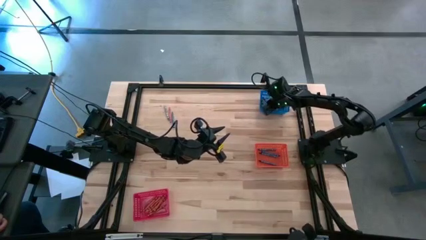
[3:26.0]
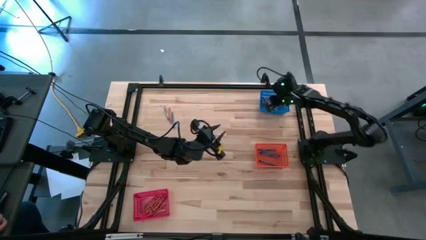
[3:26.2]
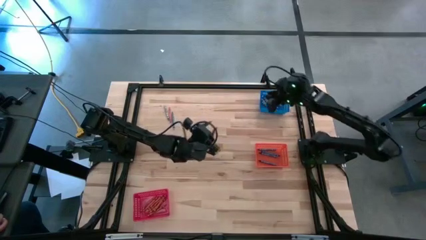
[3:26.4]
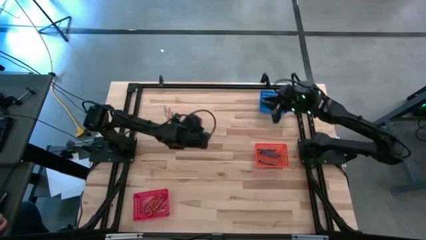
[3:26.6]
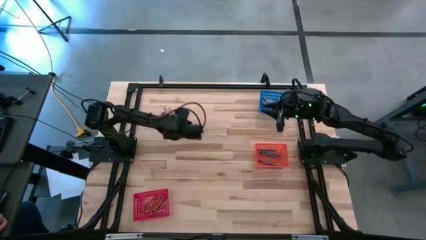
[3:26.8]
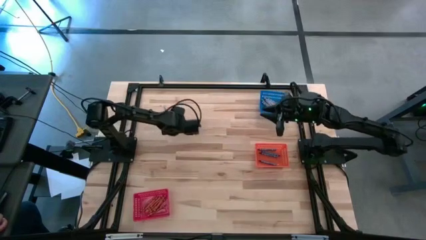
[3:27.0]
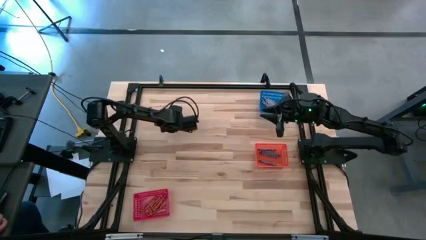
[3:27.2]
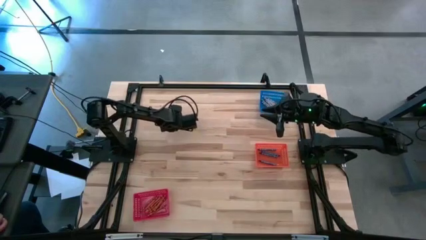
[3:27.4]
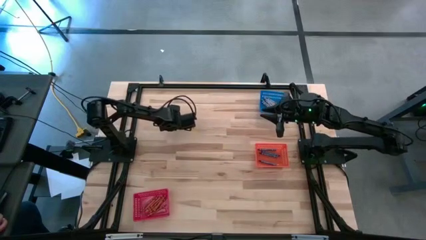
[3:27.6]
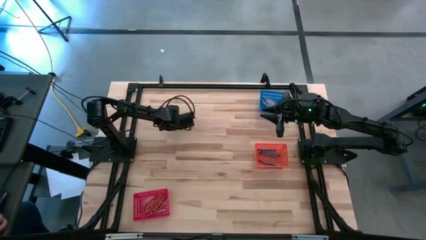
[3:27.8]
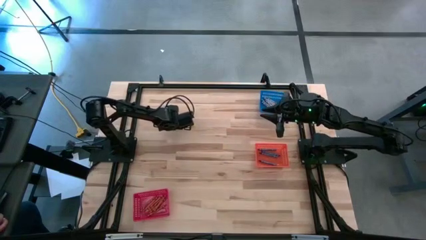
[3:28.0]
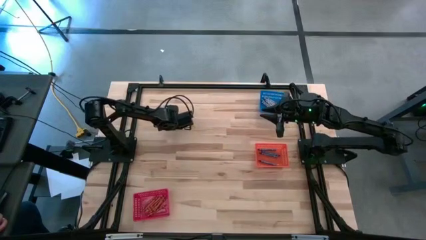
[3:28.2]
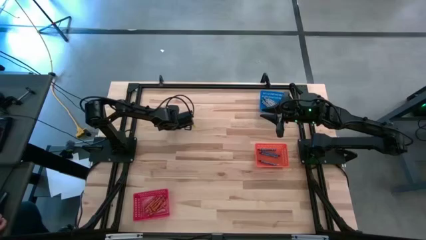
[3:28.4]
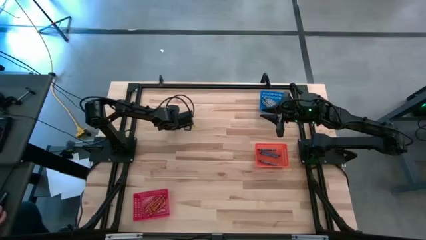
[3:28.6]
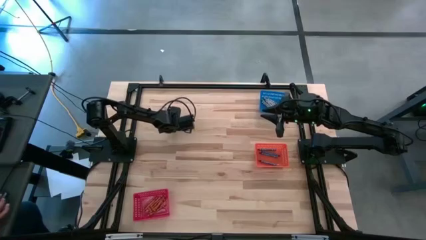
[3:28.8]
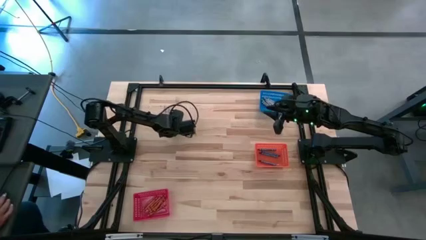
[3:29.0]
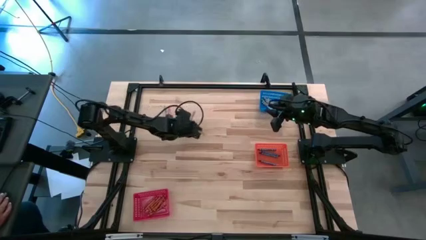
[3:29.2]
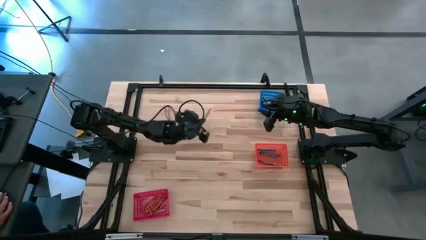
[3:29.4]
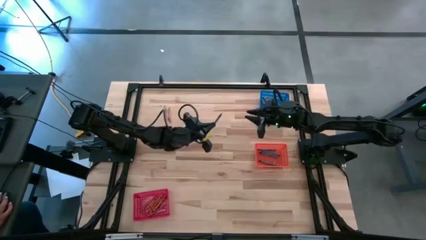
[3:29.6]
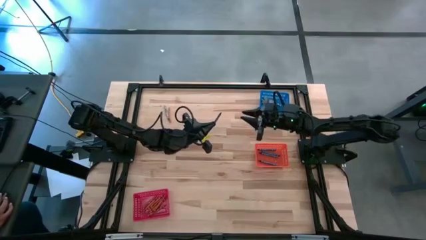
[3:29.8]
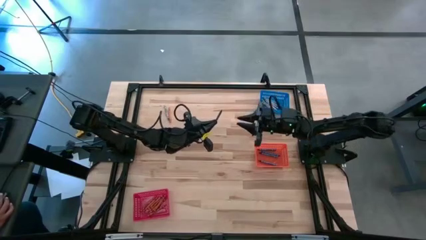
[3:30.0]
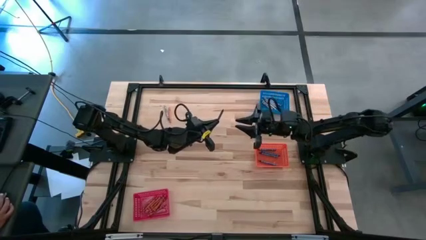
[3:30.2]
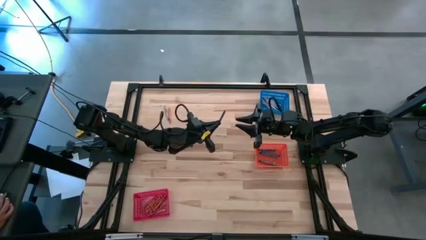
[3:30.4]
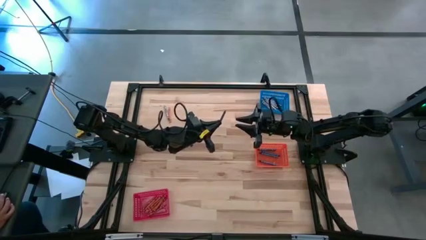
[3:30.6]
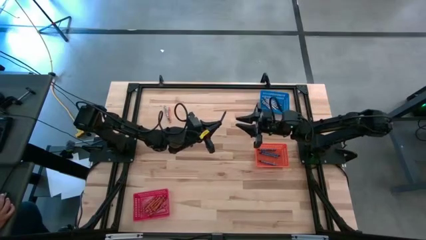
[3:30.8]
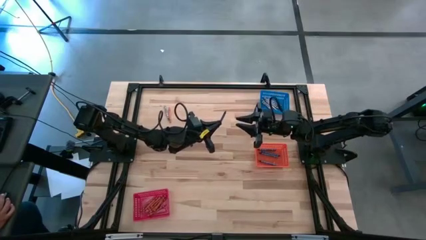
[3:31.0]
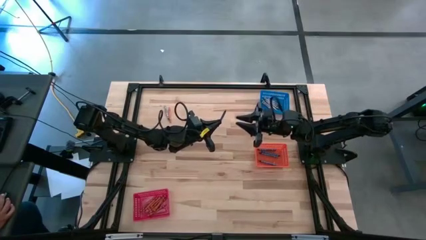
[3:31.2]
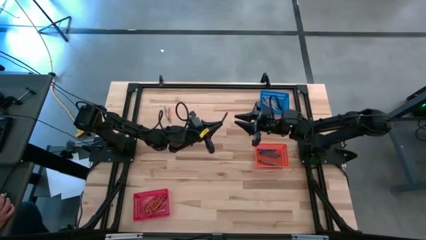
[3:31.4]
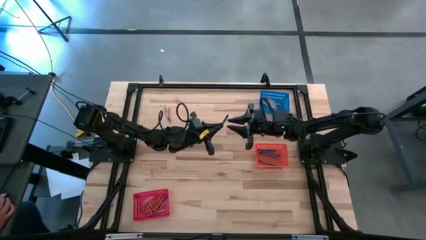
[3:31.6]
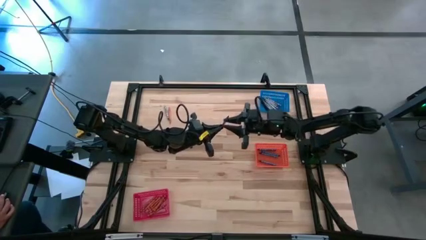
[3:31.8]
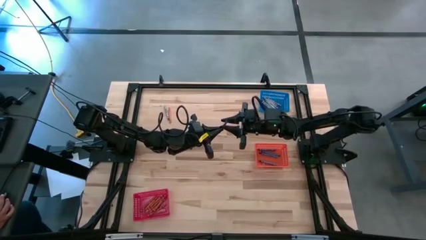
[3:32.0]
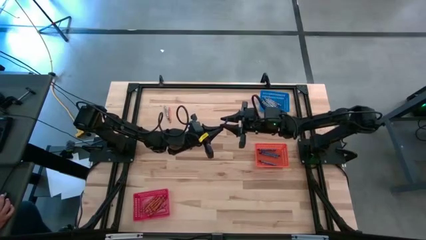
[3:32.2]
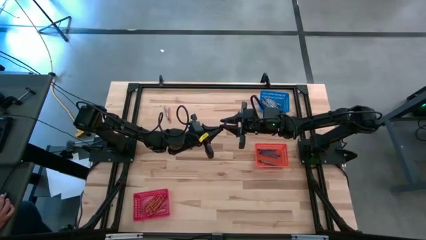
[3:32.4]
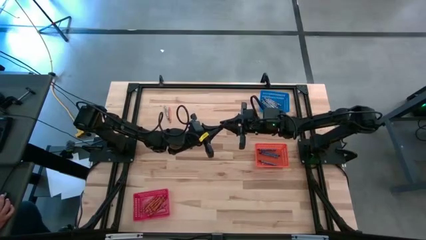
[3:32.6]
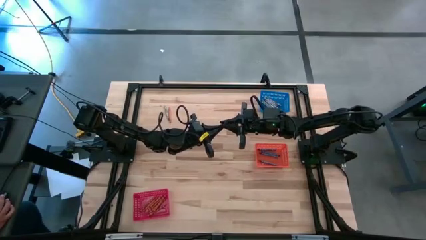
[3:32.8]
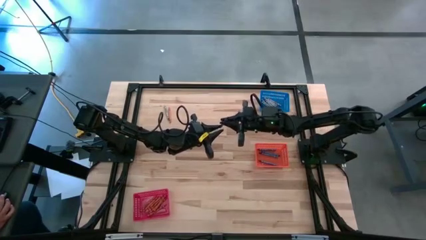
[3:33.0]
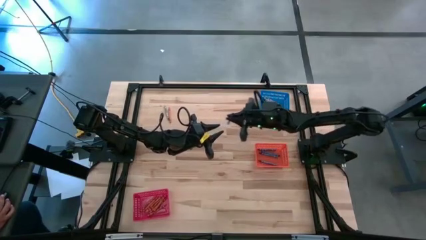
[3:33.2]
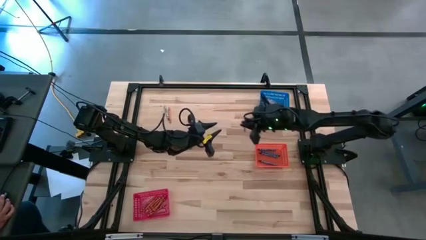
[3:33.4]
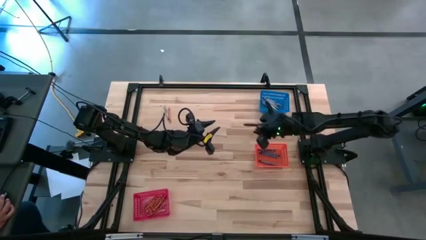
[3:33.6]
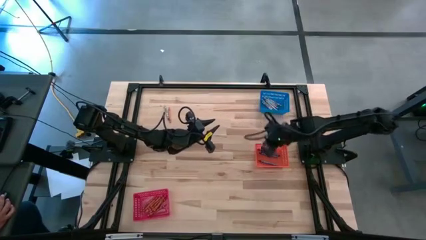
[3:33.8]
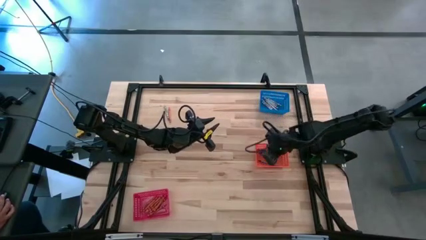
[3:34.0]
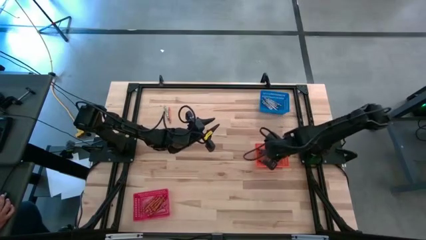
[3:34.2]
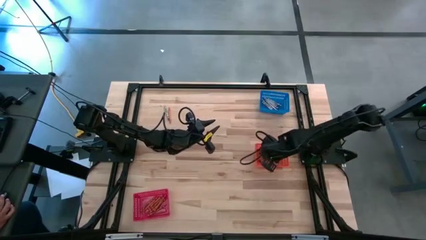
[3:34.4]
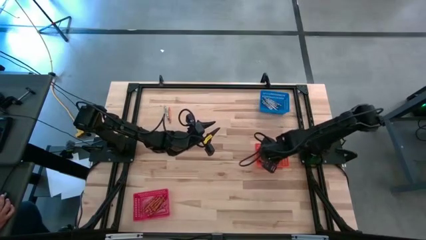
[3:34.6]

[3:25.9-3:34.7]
Task: Sort crayons
Put the blue crayon into the orange bin

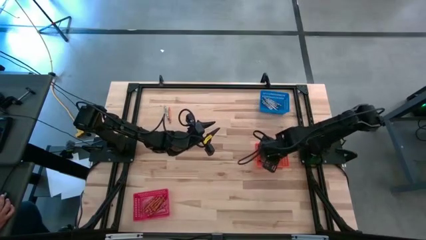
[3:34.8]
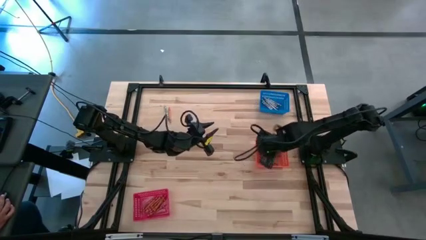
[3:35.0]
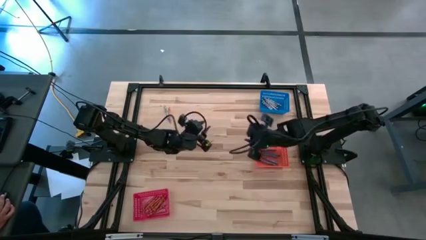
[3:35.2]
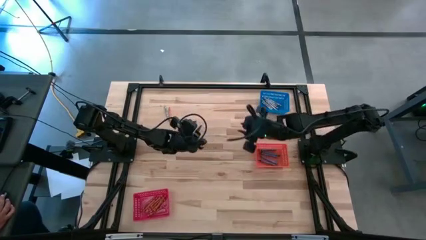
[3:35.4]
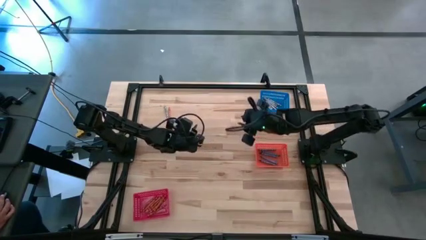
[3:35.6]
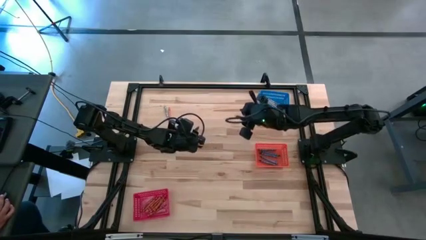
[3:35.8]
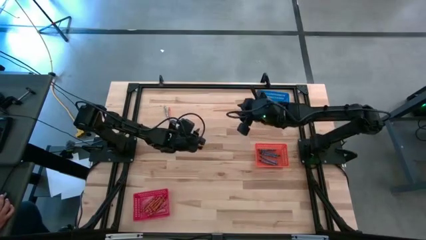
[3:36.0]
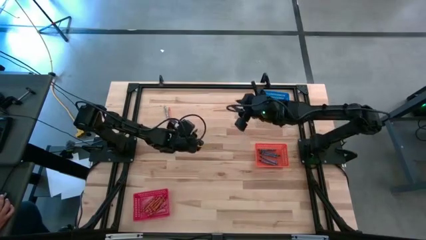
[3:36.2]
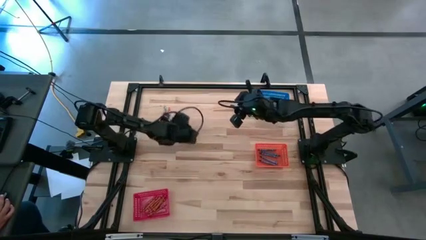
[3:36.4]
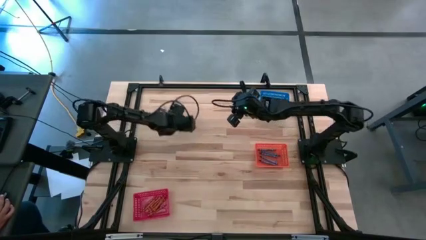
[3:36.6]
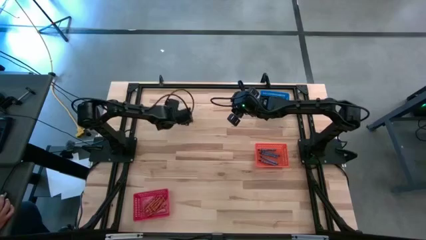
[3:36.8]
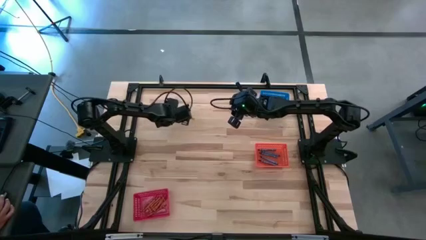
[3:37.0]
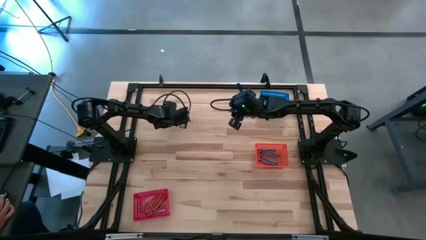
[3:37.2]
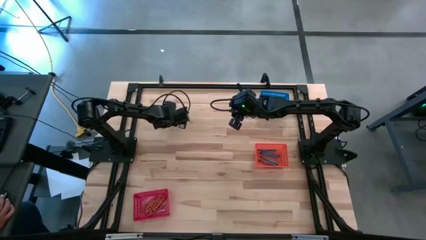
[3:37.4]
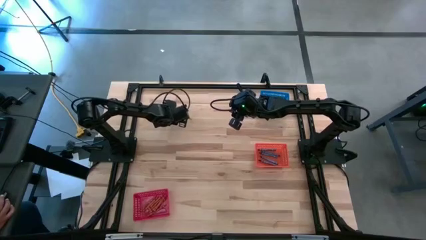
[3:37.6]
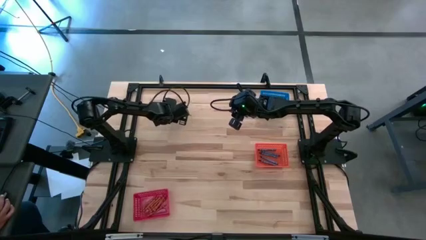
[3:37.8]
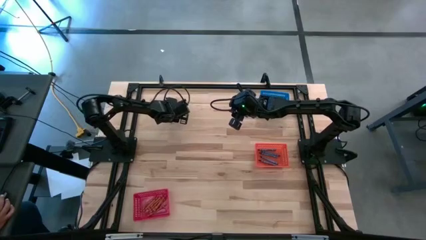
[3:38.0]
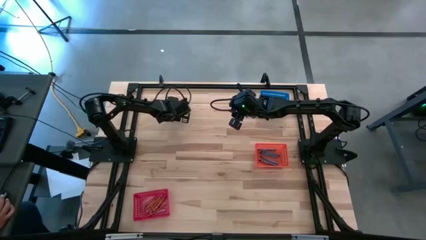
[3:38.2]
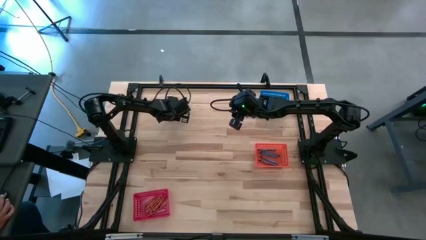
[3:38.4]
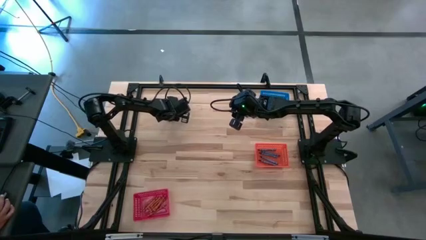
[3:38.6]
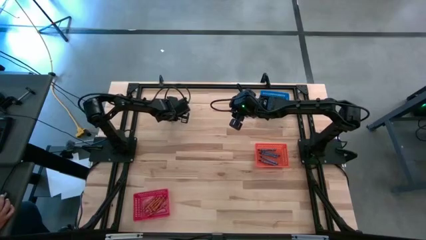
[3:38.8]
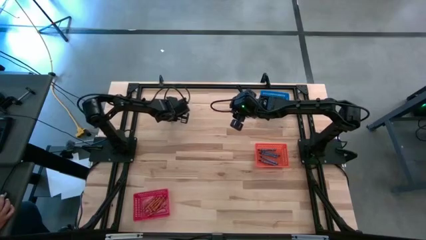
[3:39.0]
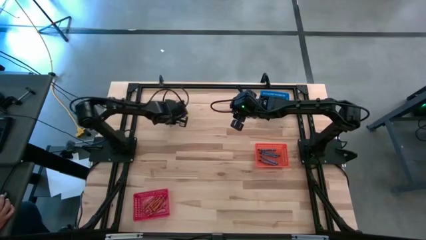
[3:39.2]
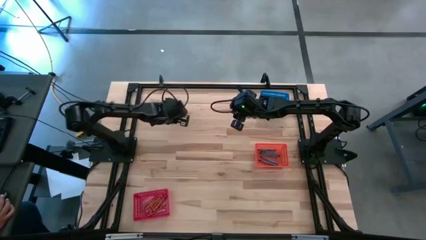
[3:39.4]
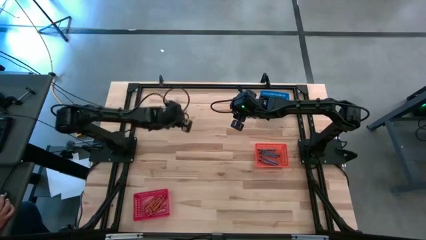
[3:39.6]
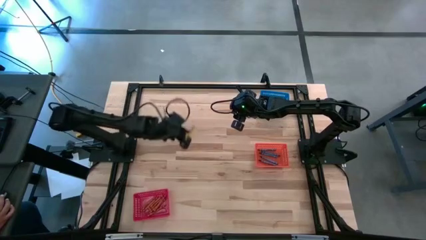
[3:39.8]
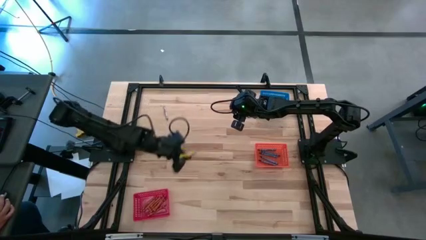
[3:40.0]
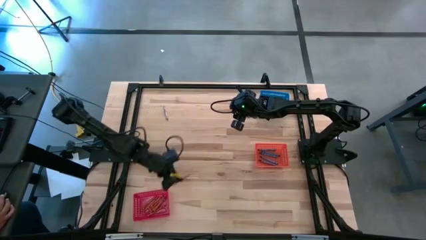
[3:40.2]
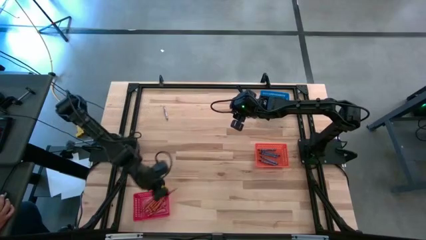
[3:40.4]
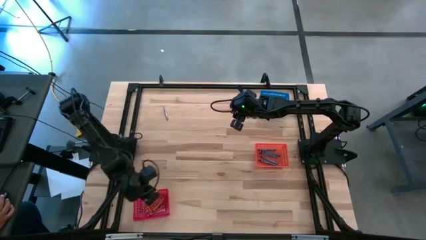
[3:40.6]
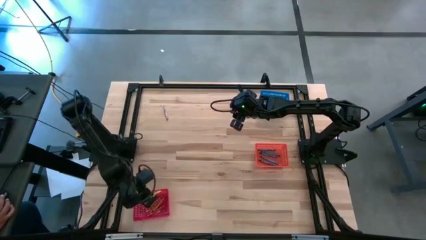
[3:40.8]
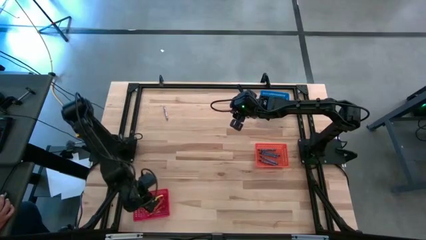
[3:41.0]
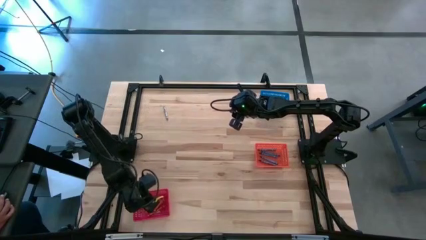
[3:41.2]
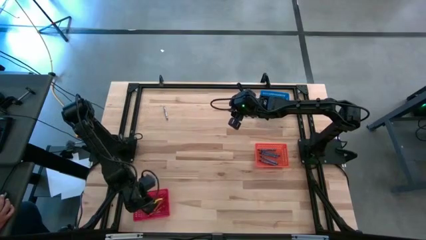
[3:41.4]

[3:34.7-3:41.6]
Put the orange crayon into the red bin
